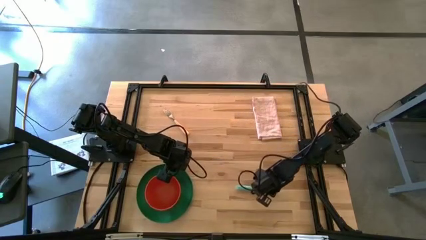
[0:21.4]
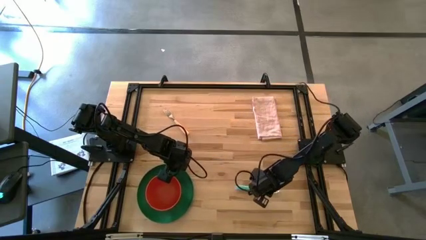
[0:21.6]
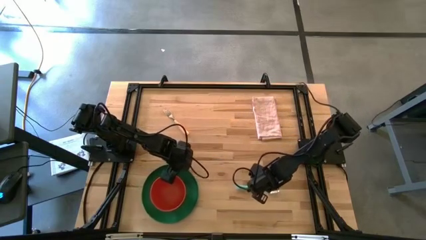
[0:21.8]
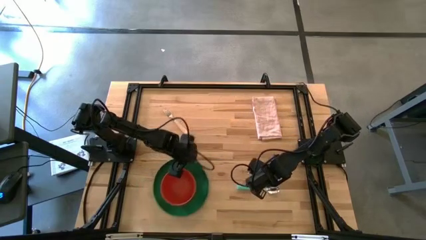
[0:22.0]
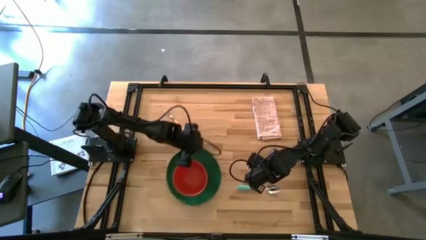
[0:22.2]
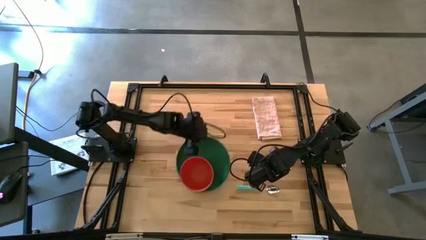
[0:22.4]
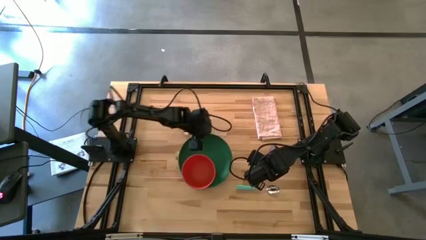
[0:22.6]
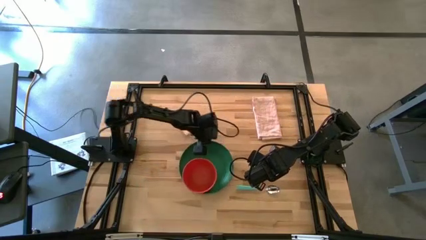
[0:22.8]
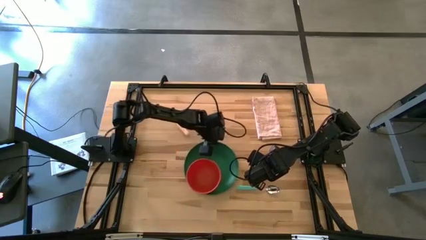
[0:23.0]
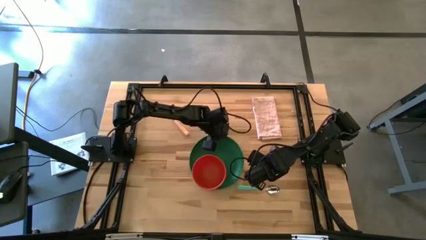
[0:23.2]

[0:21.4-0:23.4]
Task: Set table place
Move the green plate to the center of the table

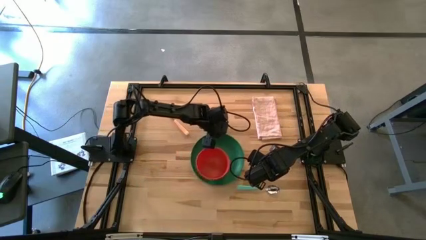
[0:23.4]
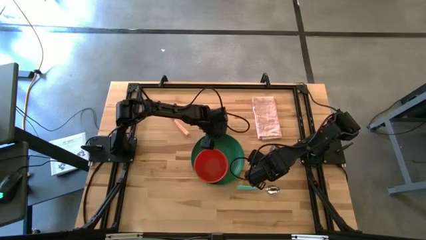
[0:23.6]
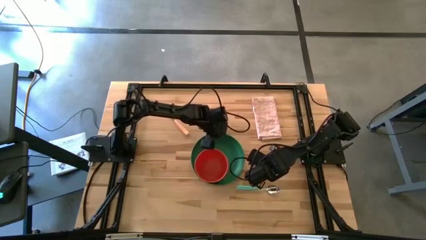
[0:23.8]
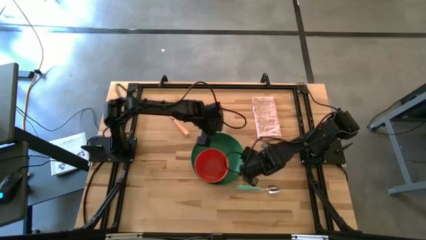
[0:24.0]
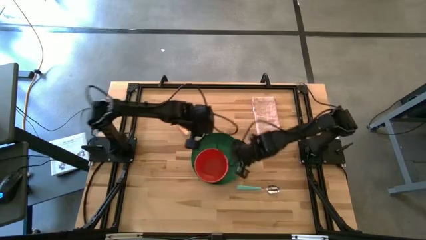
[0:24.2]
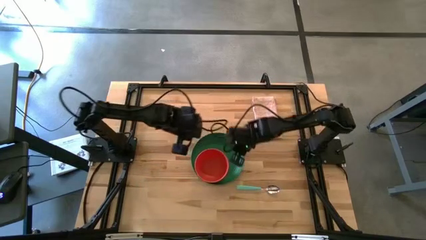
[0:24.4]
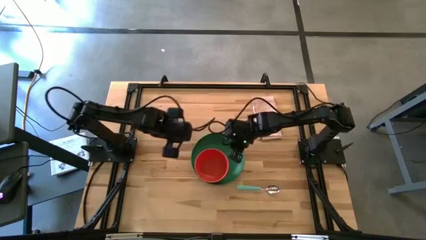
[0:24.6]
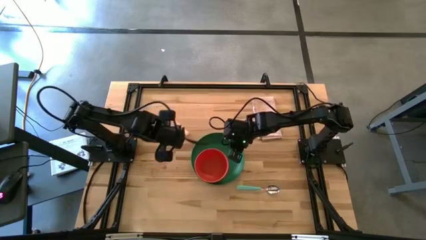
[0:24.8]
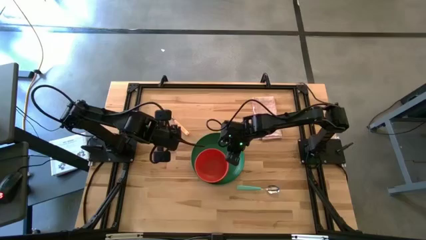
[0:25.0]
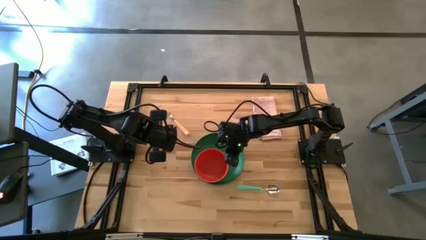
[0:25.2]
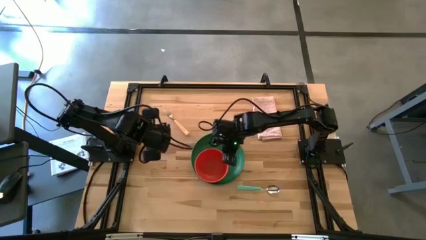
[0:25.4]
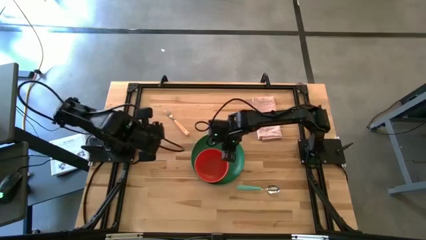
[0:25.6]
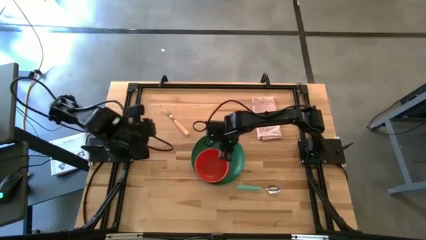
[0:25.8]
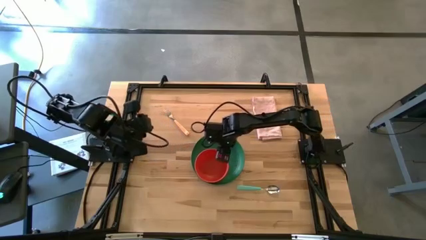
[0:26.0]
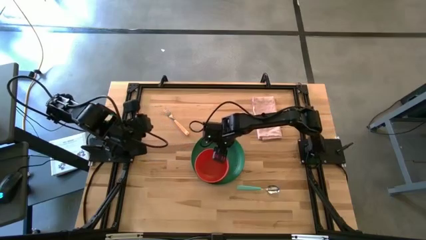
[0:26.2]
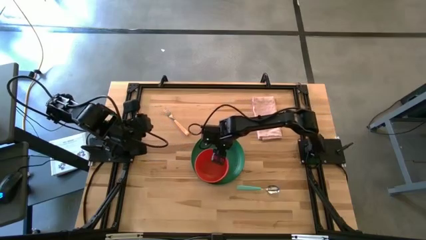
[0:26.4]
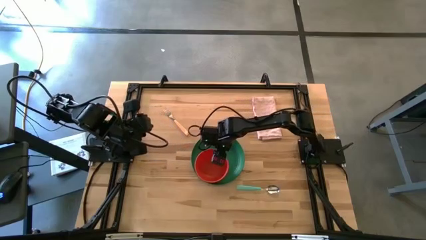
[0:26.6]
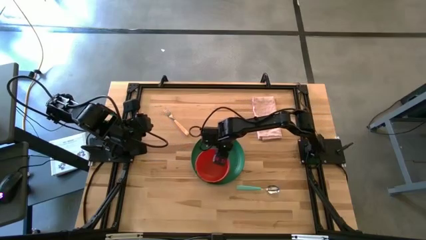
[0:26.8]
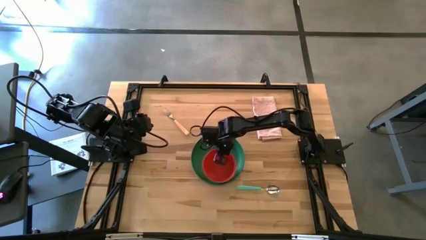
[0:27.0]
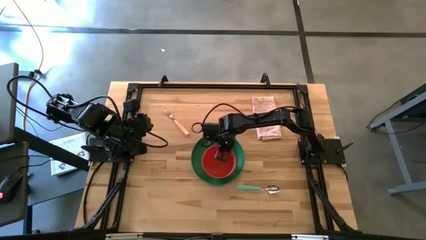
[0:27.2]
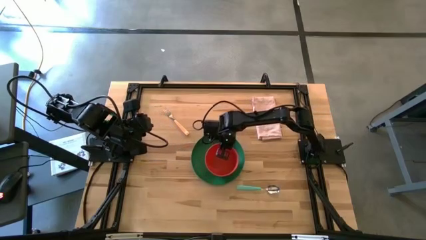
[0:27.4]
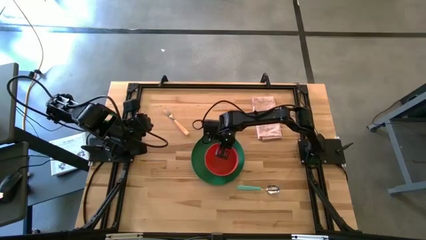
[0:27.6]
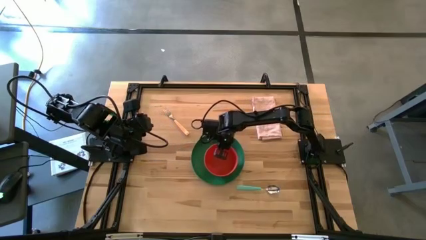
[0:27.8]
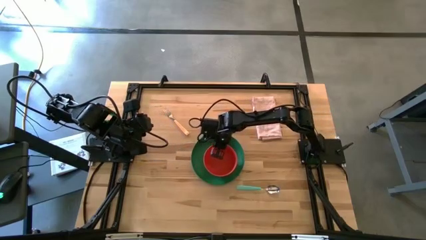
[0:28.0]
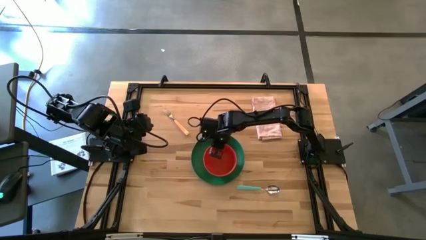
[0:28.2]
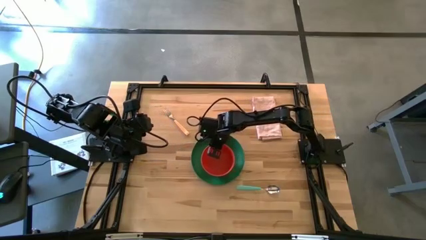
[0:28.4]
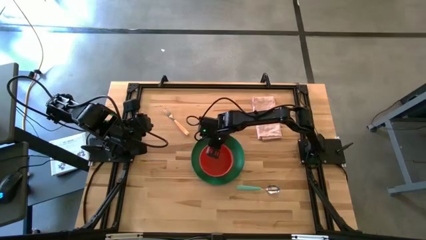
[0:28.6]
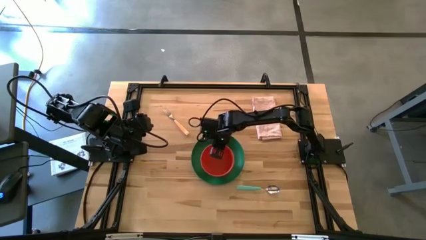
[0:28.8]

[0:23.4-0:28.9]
Adjust the orange bowl

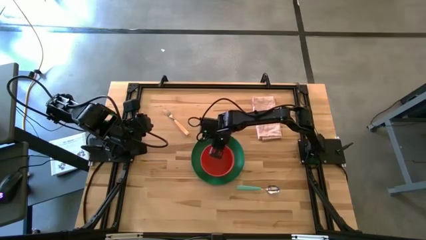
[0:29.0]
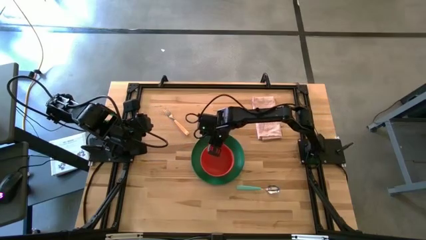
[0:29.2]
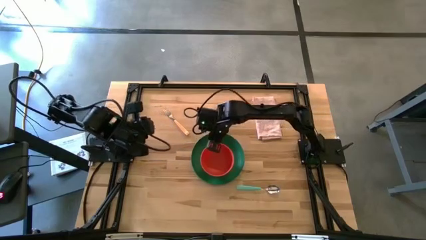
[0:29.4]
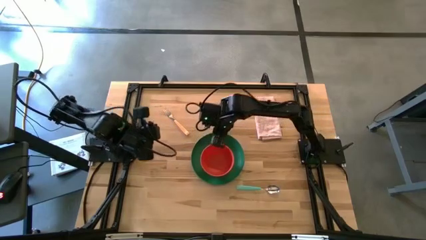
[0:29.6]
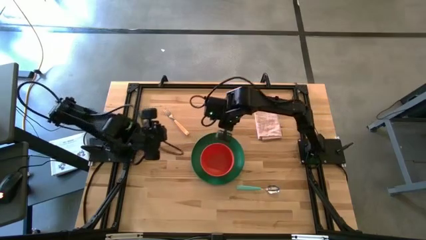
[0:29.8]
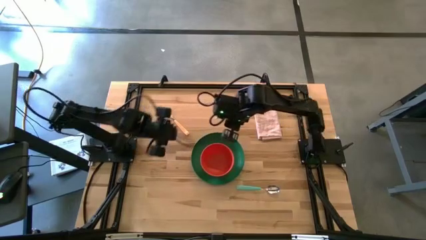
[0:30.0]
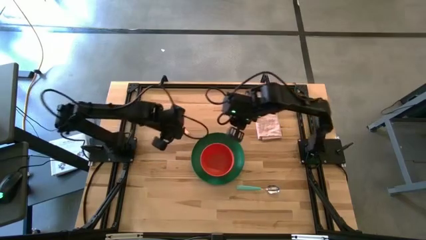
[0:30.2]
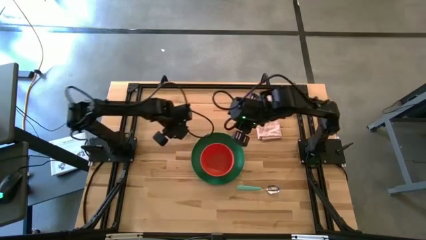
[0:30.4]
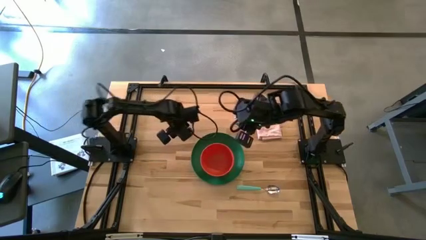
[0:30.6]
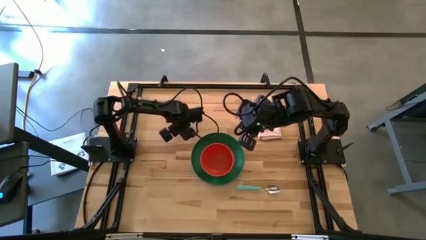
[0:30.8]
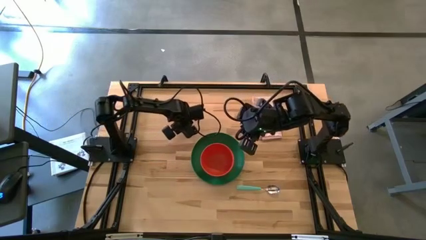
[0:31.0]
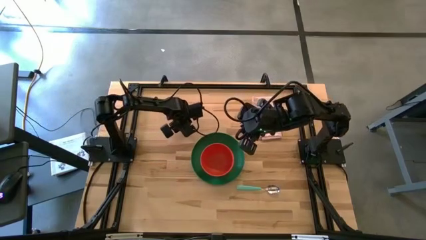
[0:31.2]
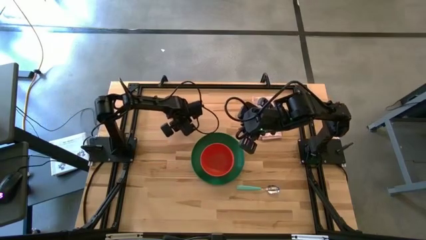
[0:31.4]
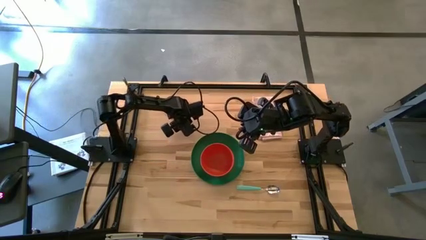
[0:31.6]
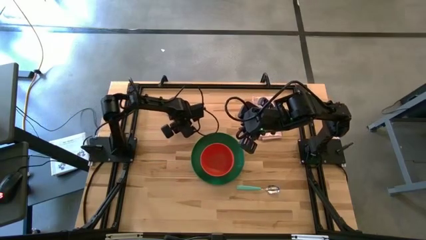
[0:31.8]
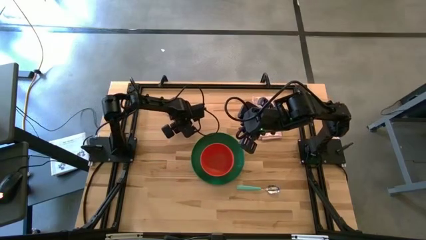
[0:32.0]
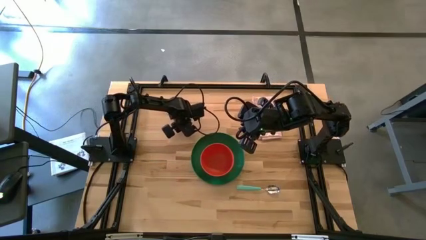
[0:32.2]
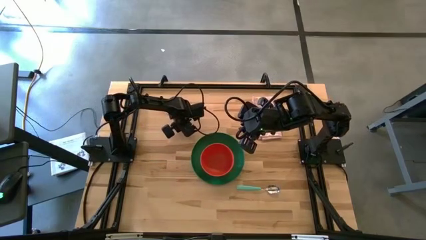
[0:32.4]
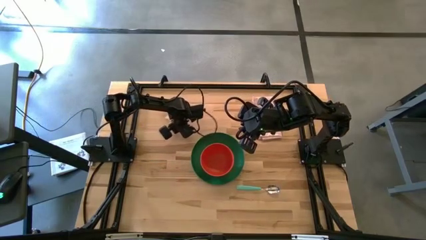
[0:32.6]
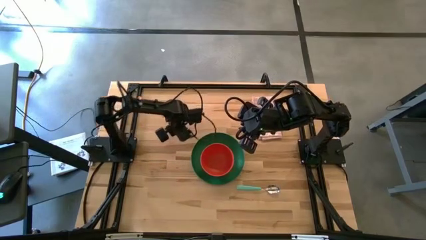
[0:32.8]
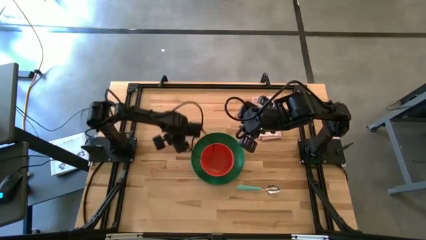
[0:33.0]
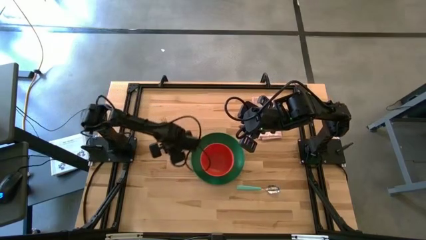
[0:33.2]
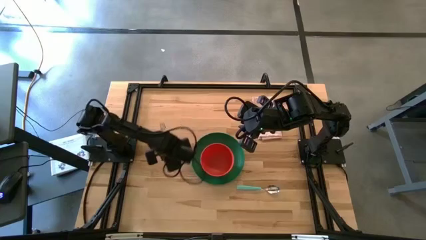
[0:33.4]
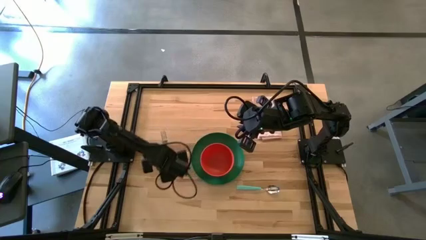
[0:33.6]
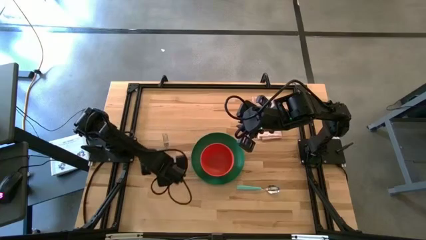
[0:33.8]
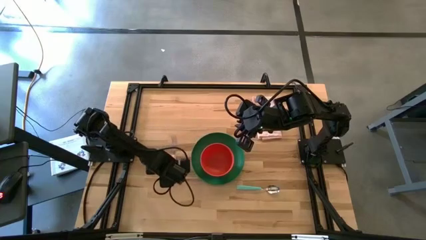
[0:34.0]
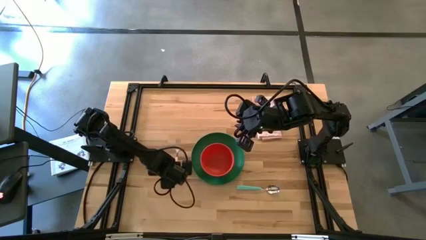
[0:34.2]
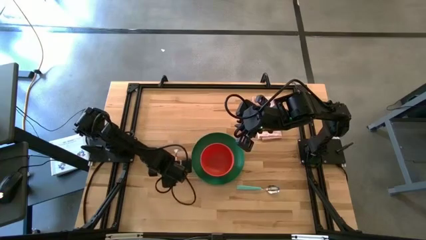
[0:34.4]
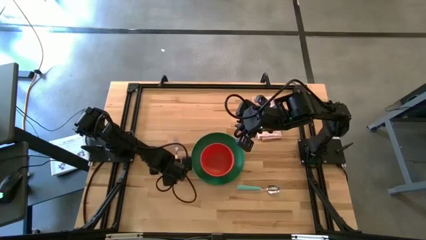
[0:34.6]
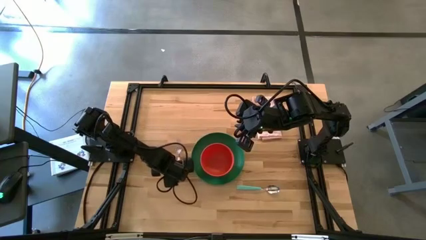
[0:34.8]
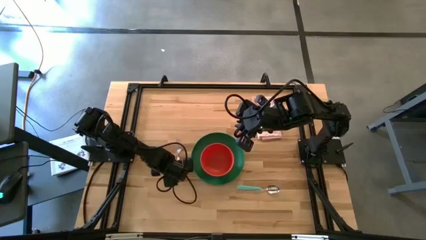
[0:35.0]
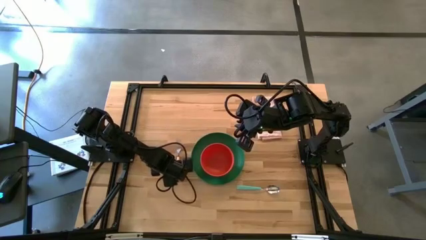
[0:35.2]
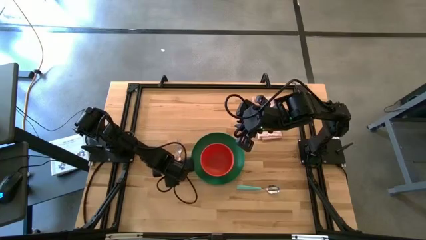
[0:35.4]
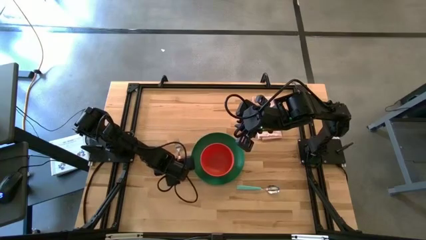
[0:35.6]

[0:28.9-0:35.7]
Put the light orange spoon beside the green plate

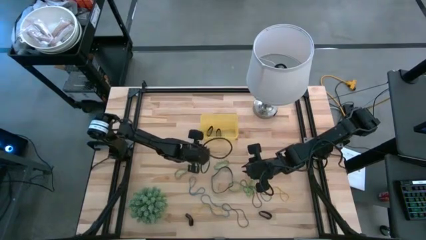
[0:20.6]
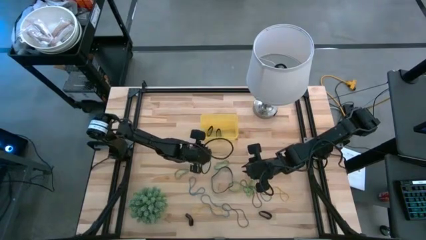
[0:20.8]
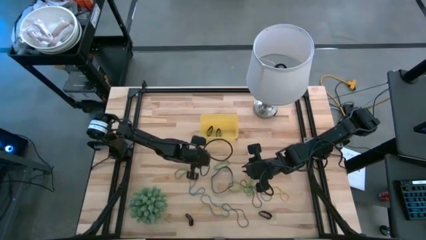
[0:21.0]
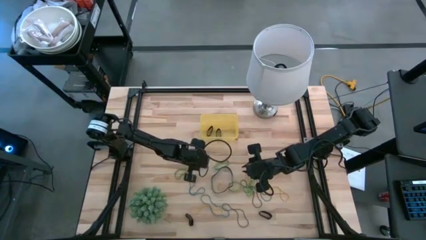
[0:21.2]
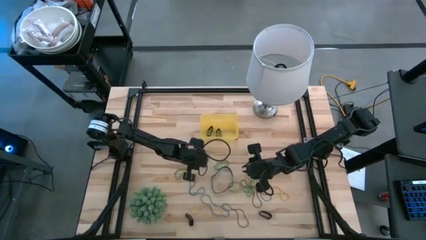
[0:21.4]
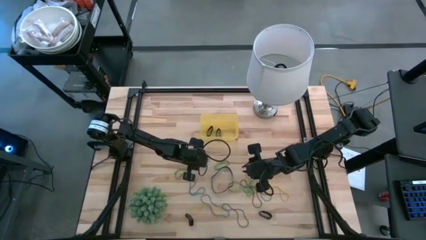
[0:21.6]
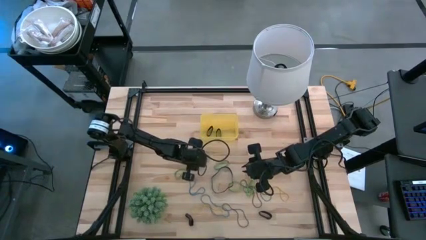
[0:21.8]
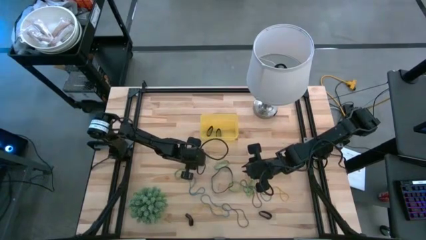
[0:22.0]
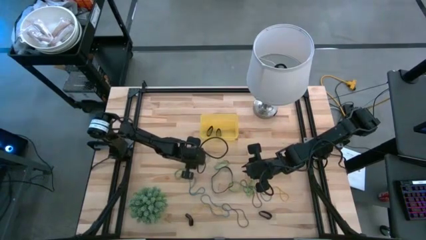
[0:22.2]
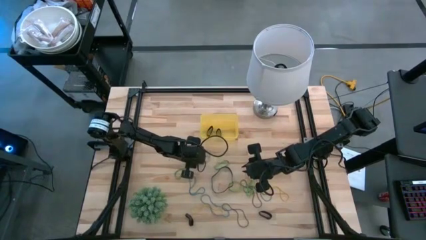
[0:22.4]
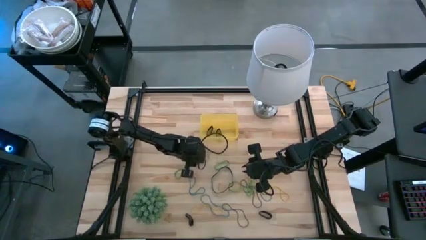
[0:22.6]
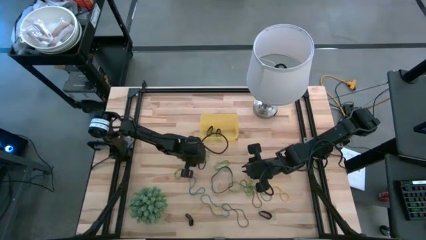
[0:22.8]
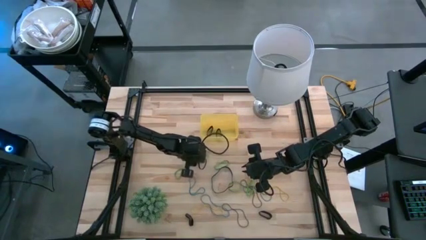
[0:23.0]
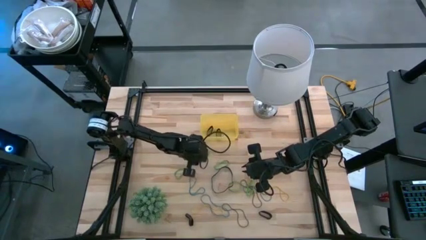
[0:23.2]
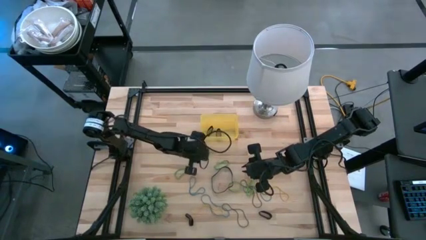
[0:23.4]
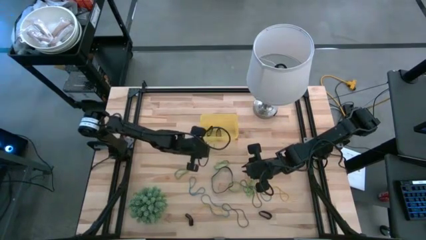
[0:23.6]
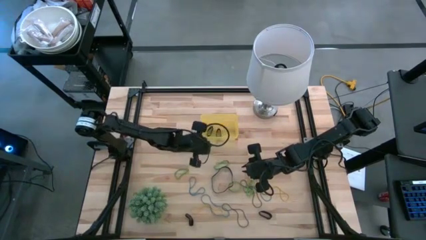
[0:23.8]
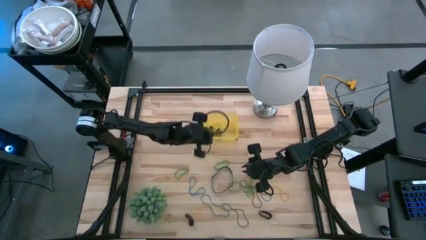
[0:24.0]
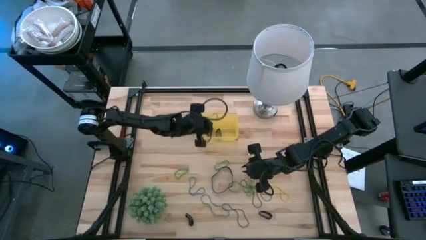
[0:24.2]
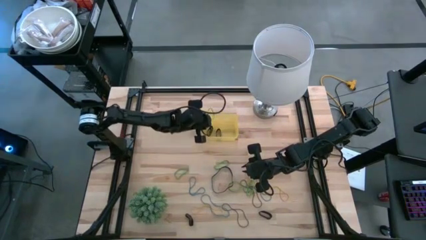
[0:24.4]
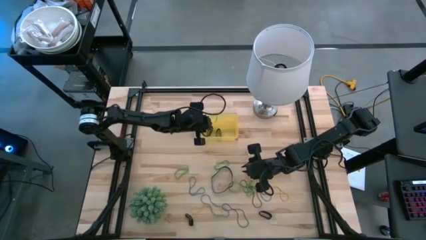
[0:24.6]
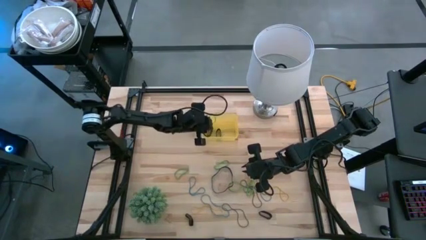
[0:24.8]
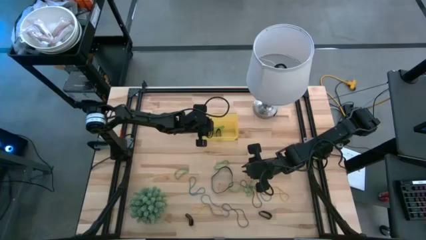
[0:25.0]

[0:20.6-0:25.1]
Task: Pick and place rubber bands into bin
Put the green rubber band into the yellow bin
